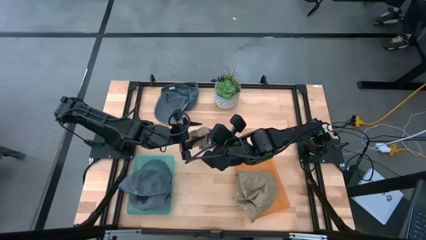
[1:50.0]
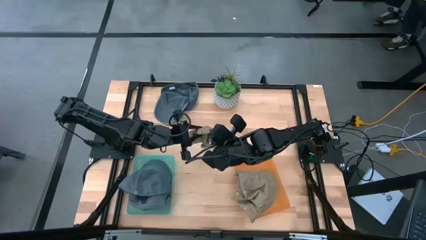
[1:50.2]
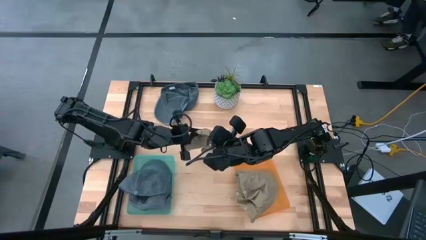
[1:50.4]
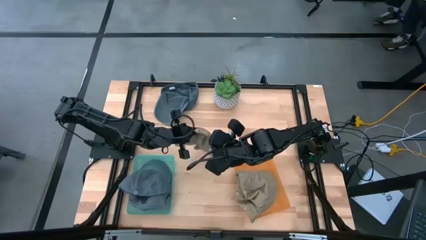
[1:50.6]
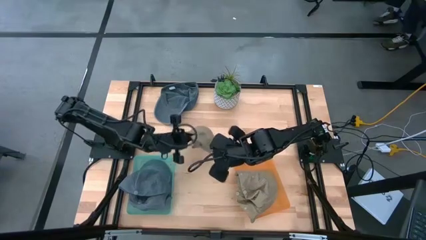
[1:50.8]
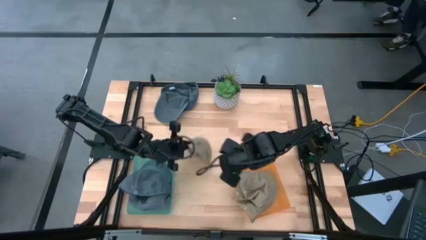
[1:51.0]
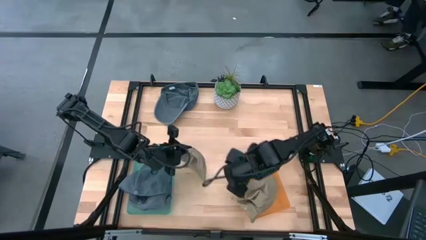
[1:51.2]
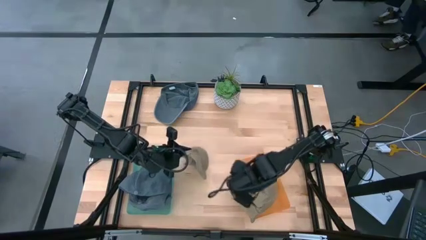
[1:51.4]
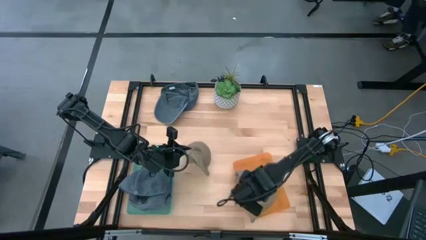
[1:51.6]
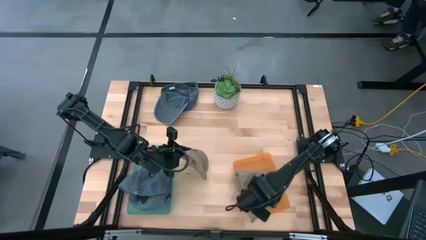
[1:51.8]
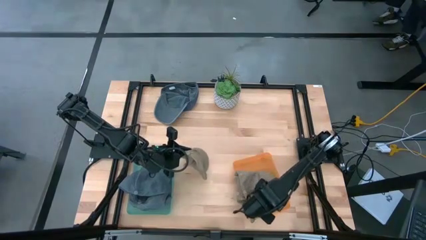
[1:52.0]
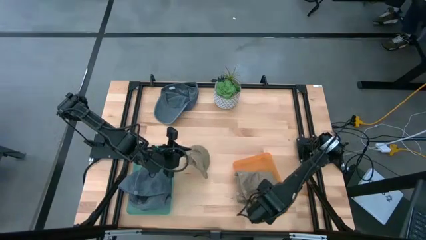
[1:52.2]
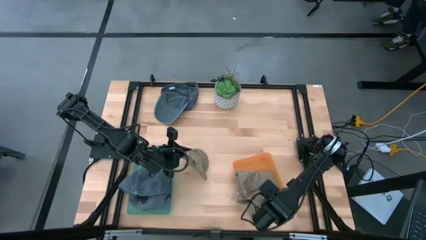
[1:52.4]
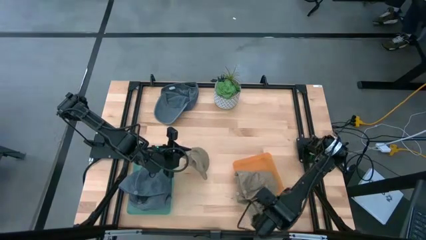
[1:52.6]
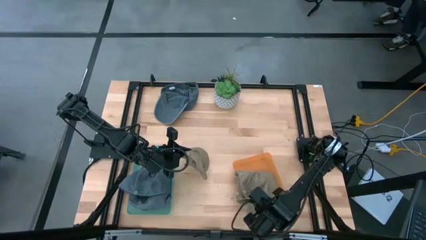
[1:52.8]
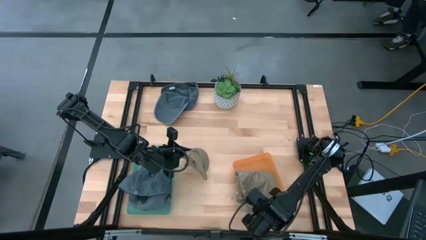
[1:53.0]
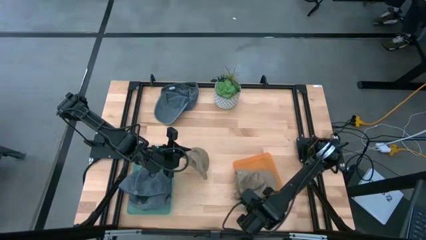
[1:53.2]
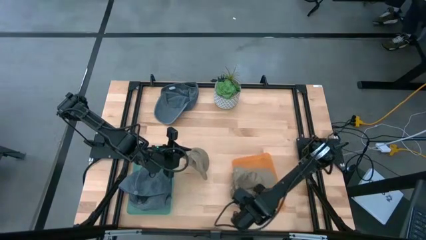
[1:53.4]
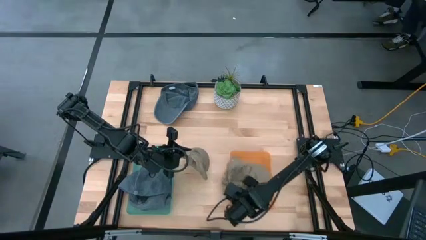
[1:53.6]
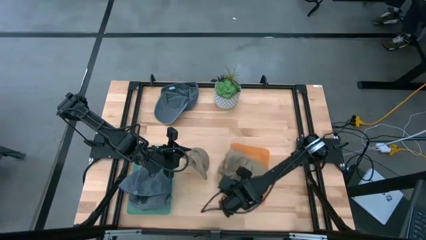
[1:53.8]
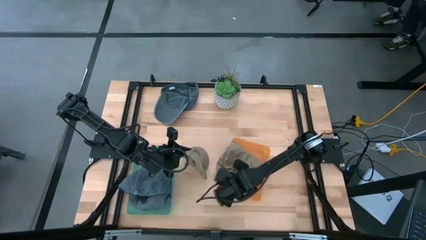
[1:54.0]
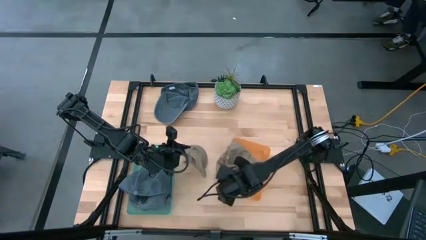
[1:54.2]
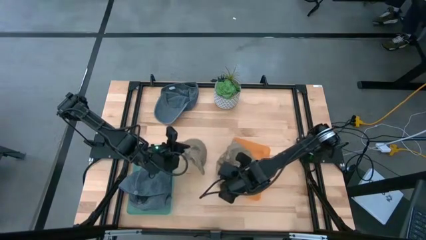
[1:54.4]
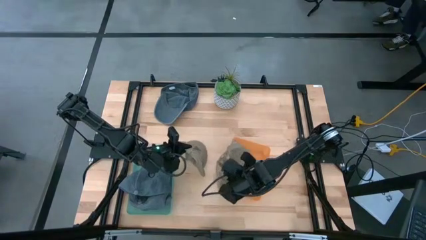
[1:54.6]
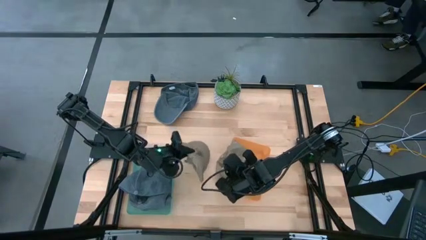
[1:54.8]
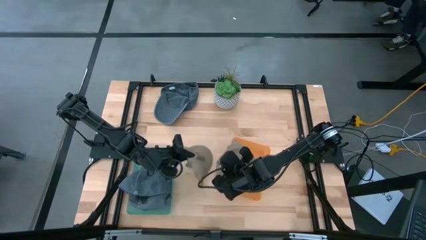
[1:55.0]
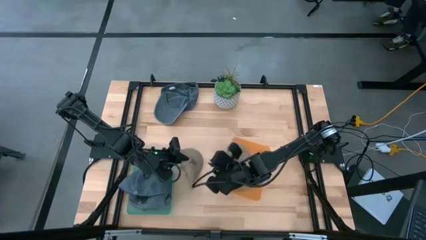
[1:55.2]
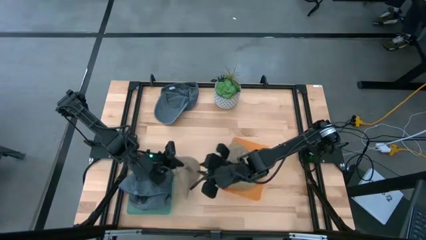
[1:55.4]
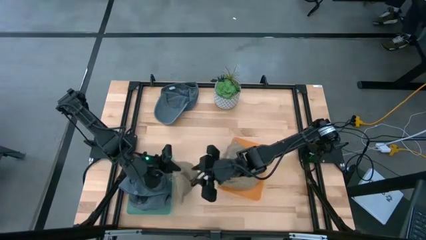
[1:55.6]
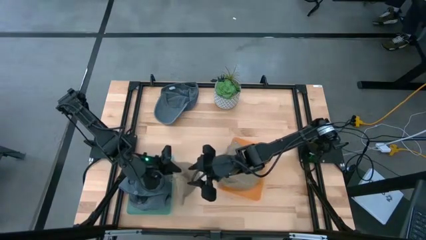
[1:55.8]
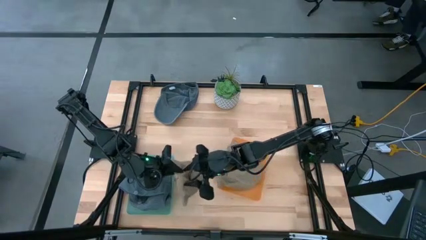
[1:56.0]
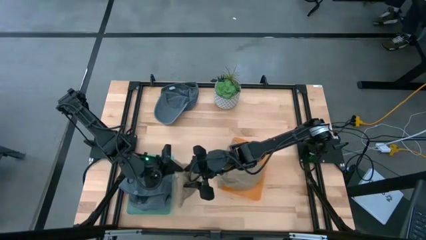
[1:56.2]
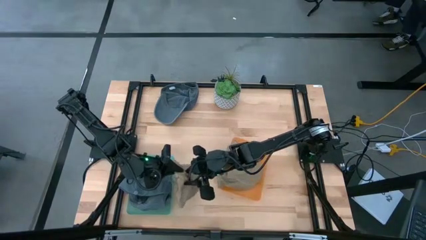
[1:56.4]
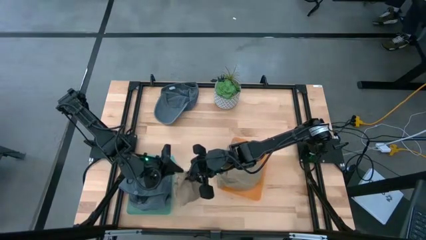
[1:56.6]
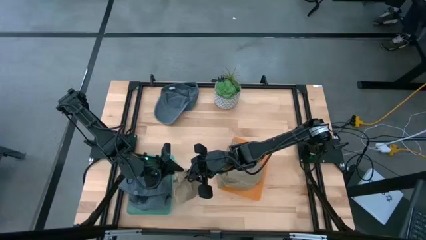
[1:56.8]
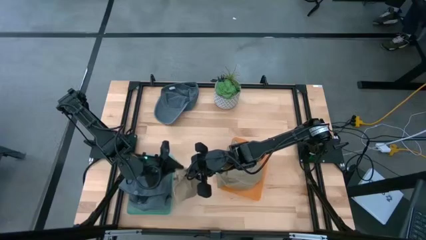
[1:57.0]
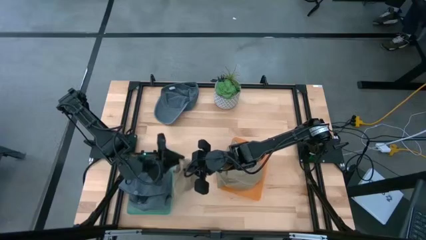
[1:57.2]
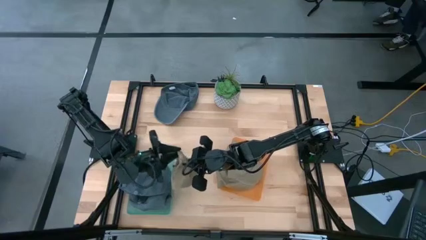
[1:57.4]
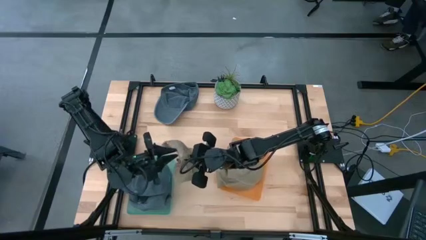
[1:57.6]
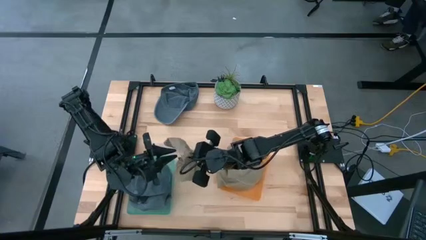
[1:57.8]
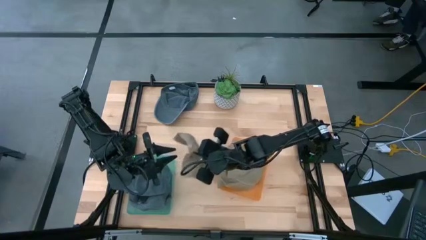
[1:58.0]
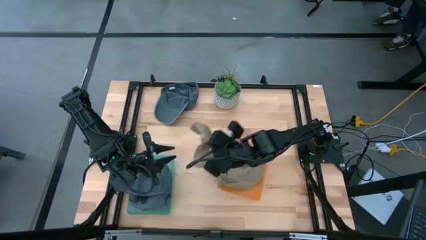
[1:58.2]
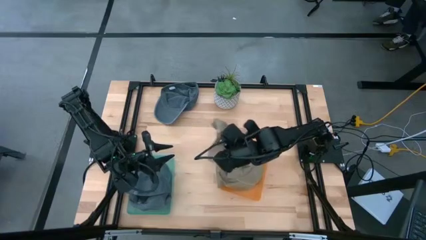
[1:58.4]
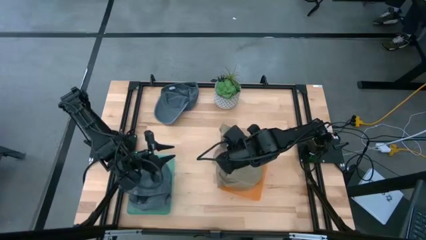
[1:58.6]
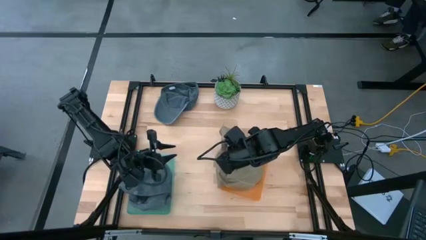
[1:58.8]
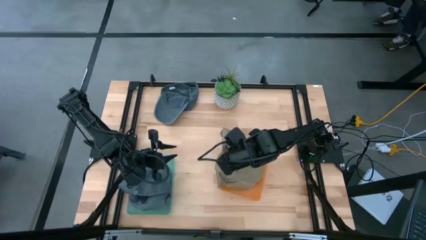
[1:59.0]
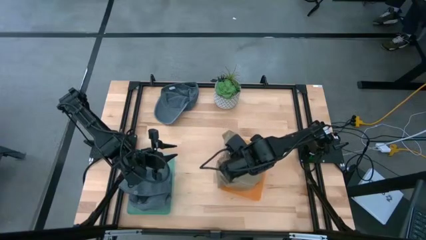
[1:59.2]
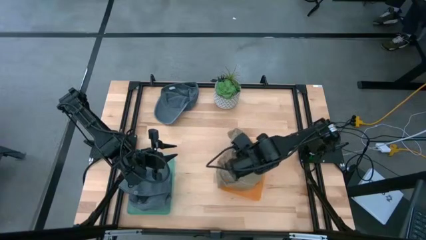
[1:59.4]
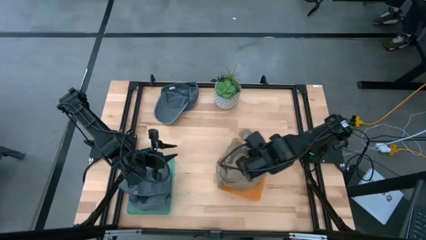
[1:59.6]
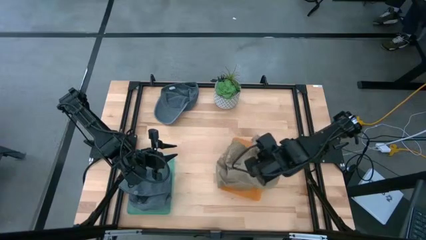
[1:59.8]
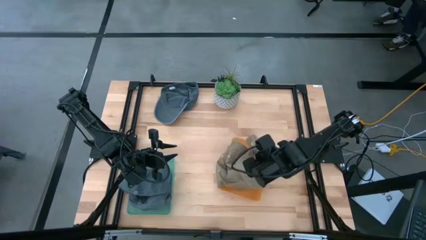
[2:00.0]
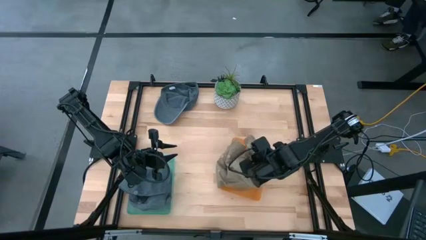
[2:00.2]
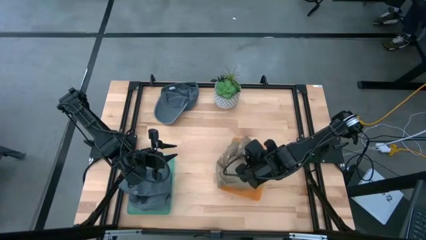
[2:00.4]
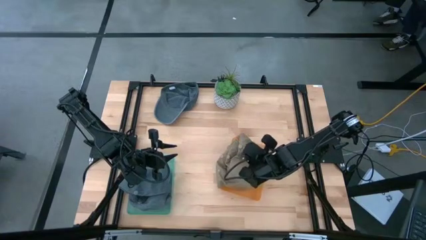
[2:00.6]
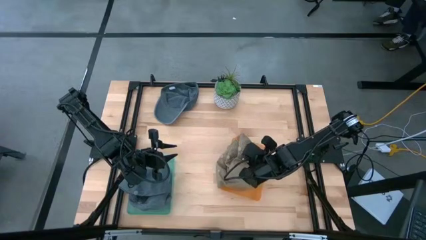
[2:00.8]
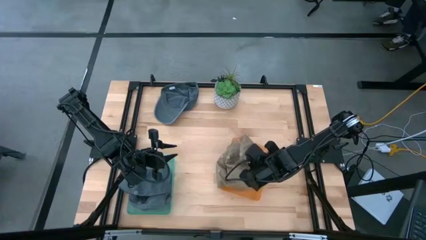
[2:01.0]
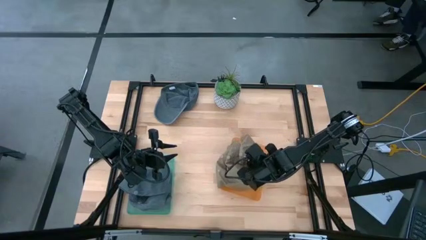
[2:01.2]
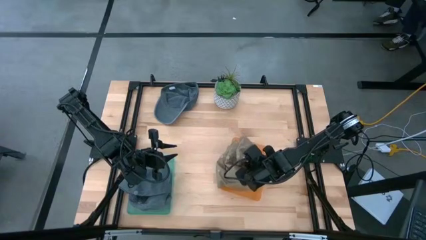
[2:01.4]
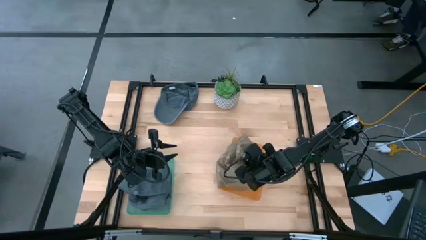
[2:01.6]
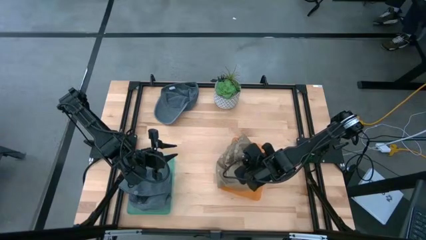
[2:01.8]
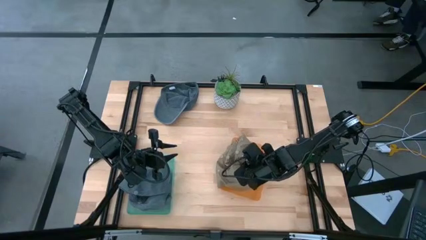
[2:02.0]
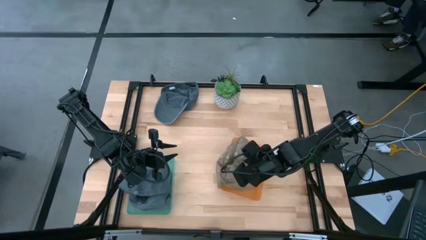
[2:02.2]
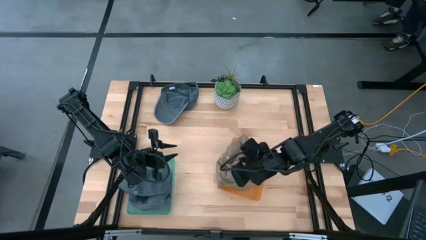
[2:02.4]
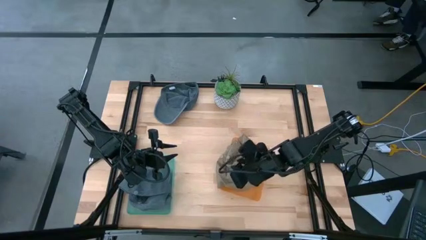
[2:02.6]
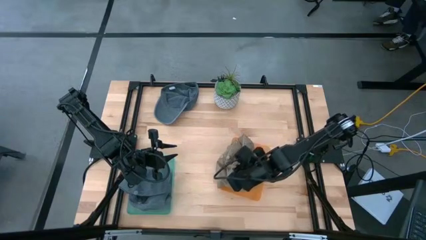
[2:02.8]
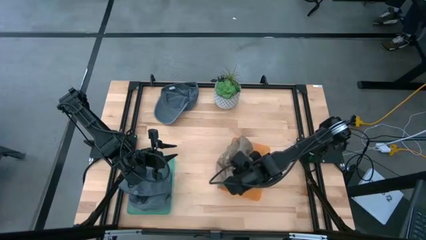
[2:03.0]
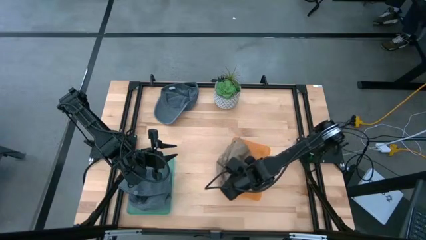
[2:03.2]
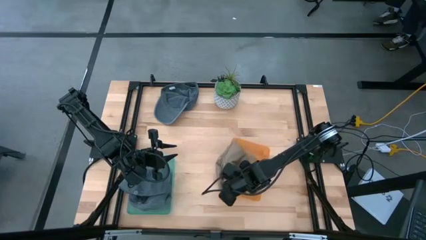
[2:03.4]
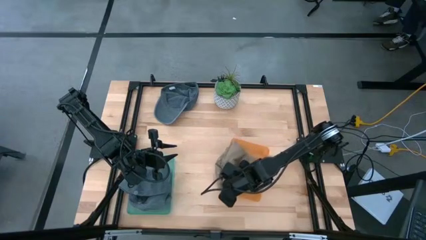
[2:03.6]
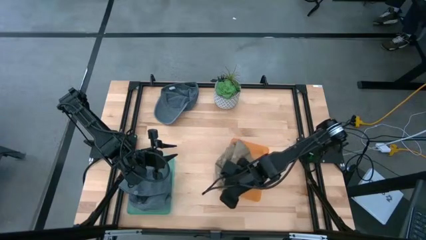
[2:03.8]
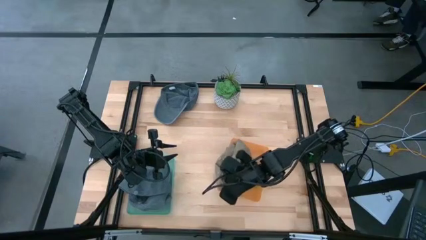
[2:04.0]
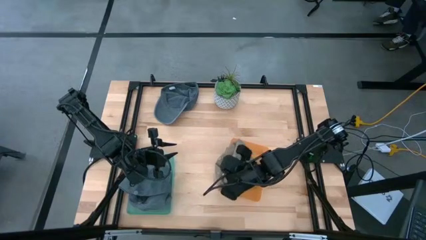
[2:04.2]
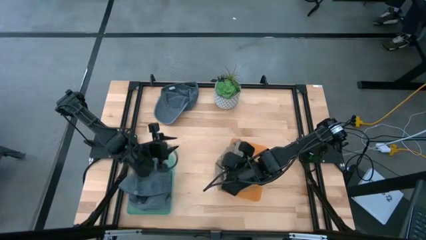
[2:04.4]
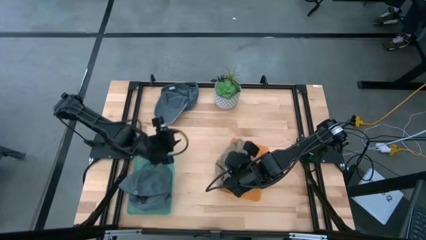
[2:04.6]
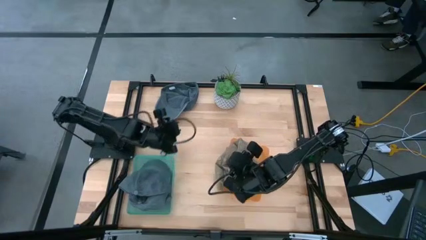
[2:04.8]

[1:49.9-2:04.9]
Task: Pick & Place hat
Put the brown cap into the orange bin

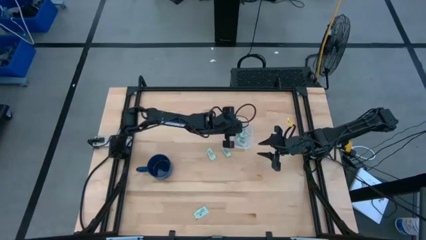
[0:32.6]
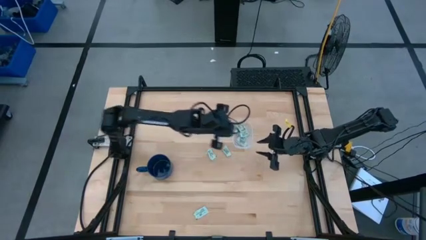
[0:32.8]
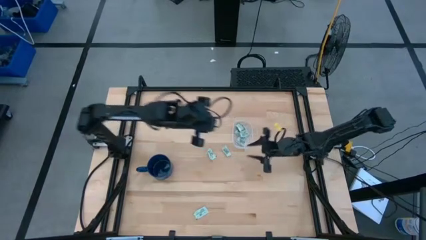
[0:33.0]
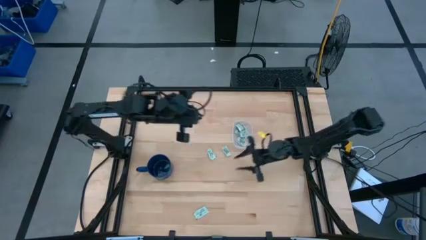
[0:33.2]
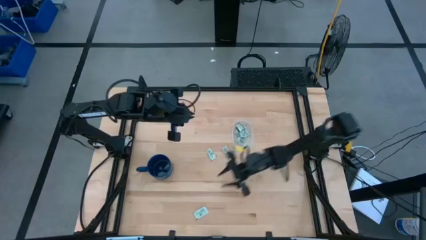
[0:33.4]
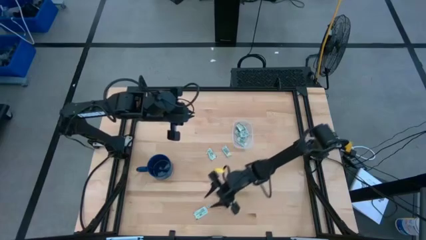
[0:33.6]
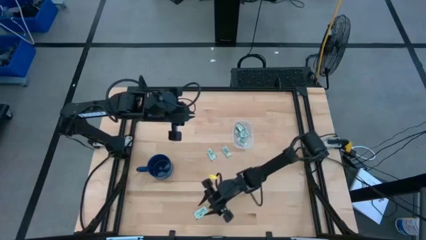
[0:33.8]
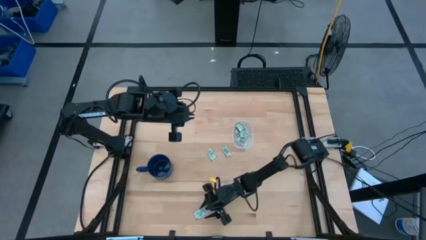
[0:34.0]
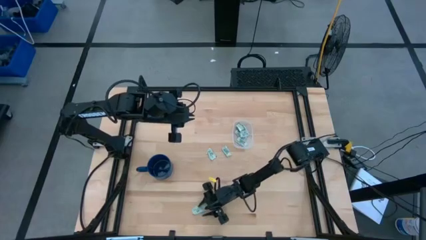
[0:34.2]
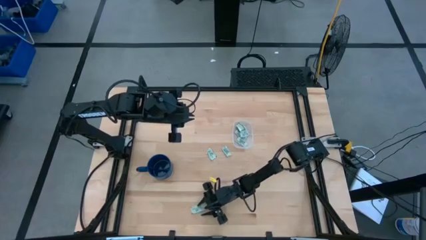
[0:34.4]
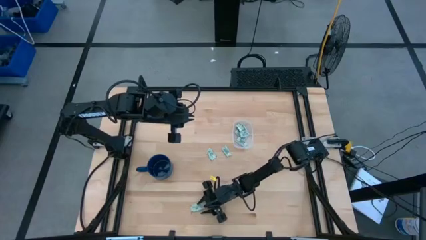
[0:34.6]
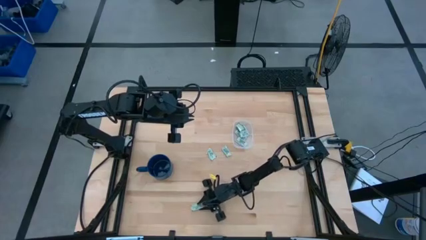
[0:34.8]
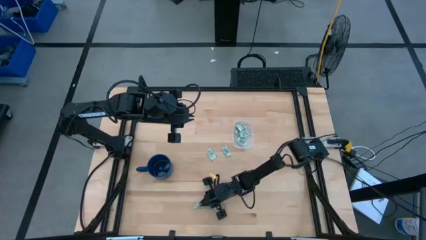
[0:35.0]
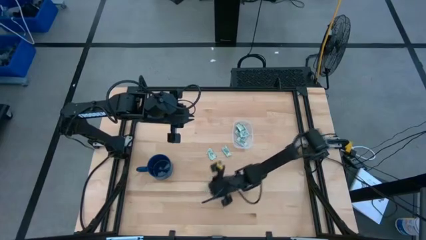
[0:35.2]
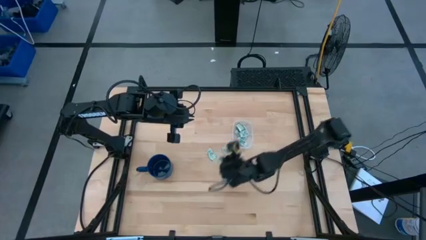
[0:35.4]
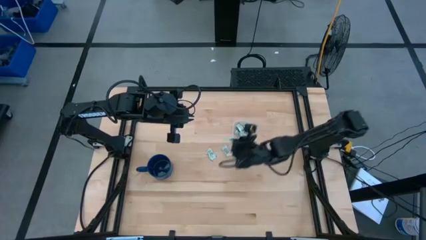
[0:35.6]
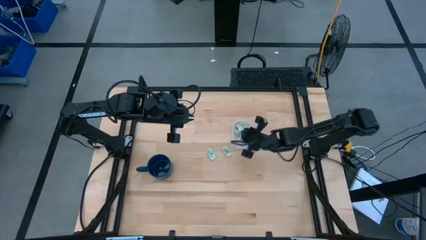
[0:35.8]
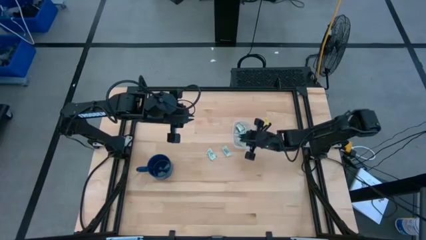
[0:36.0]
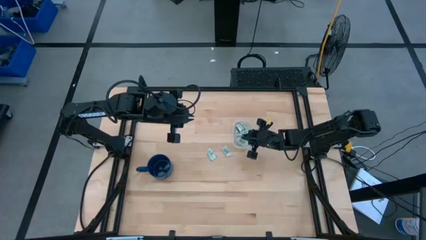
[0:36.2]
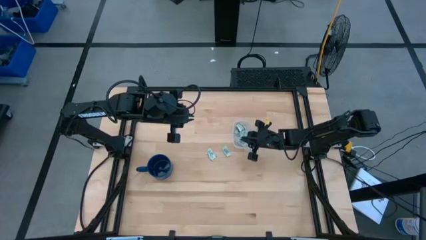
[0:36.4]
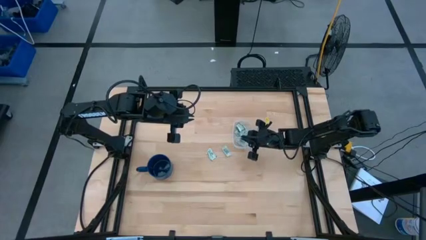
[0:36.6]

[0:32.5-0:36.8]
Task: Pick and place Stevia / Truvia into bins
Put the light green stevia packet into the transparent container
